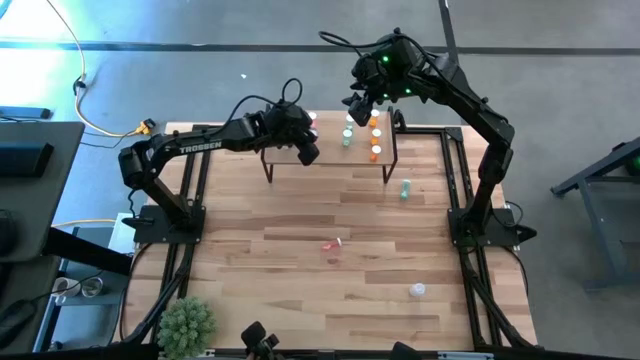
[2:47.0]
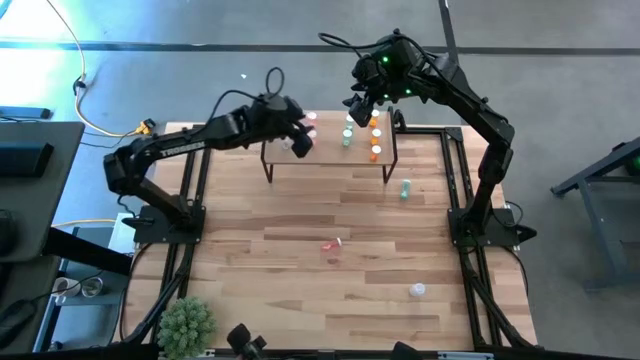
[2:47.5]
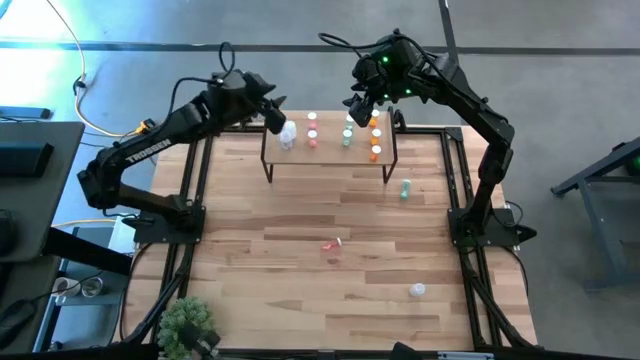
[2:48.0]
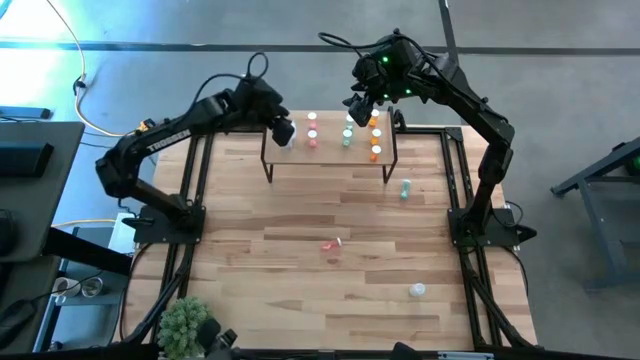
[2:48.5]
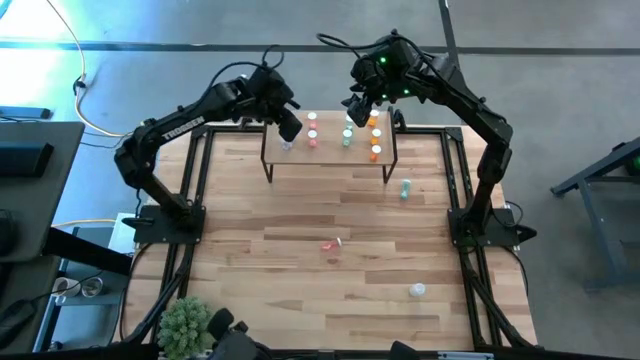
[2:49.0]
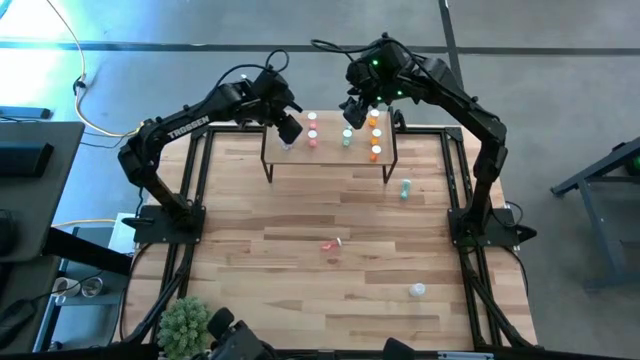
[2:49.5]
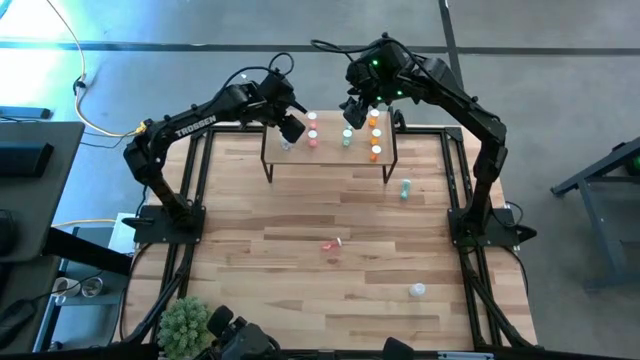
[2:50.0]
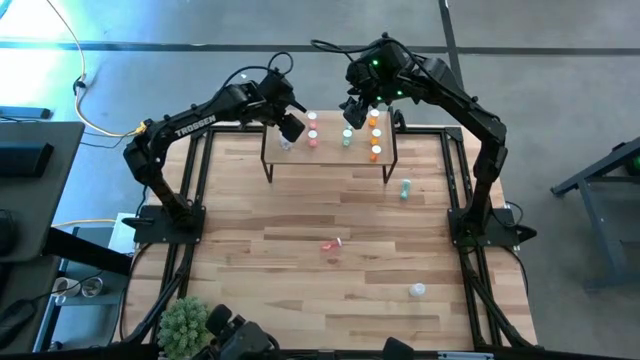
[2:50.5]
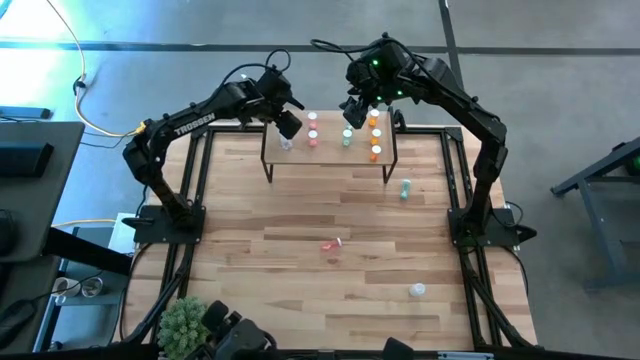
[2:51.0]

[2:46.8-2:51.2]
Task: Pick and place medicine bottles onto shelf by color
Adjust the white pill bottle on the shelf

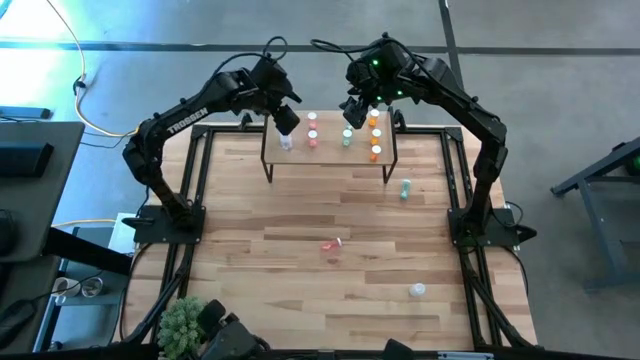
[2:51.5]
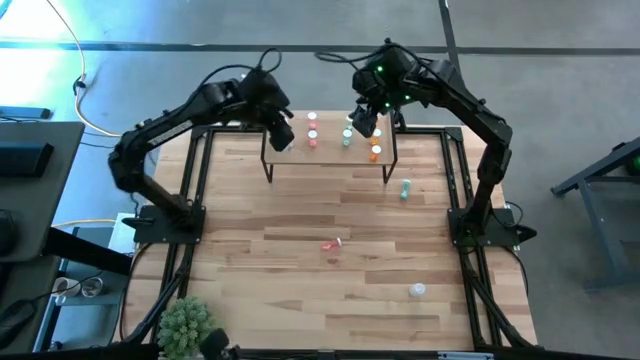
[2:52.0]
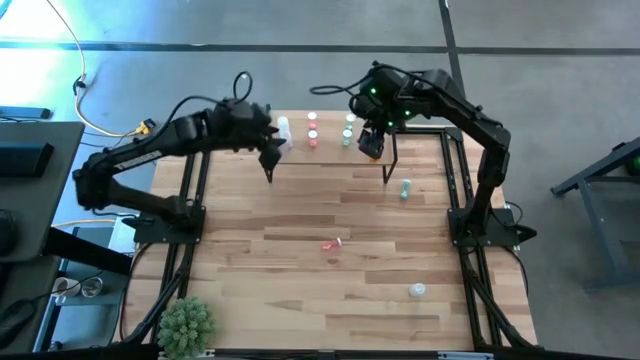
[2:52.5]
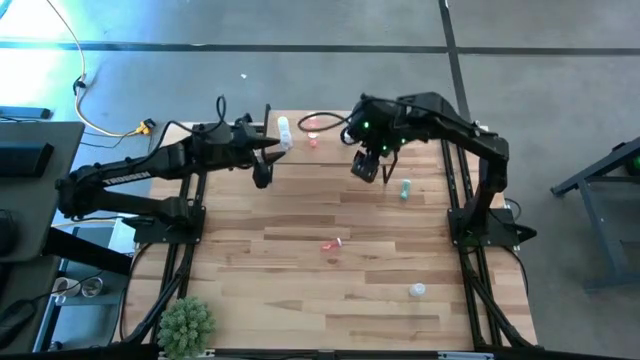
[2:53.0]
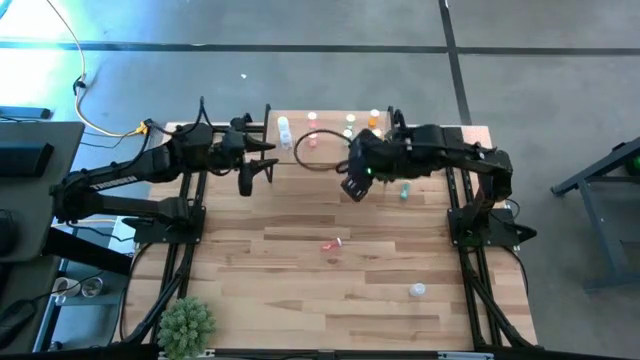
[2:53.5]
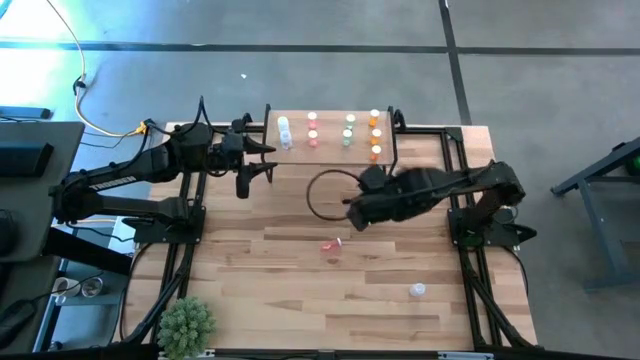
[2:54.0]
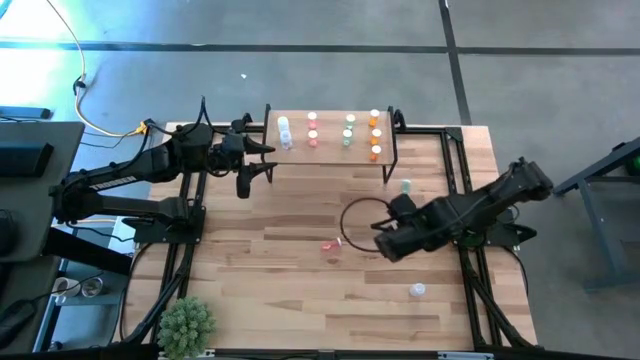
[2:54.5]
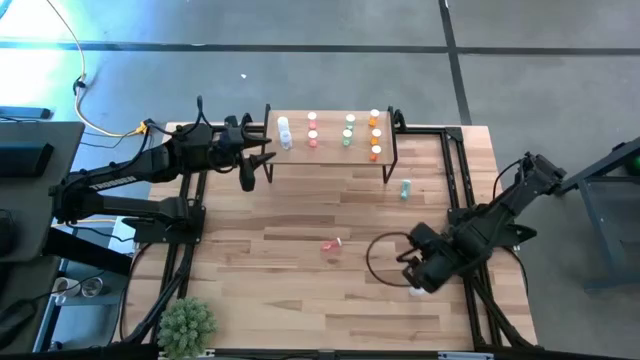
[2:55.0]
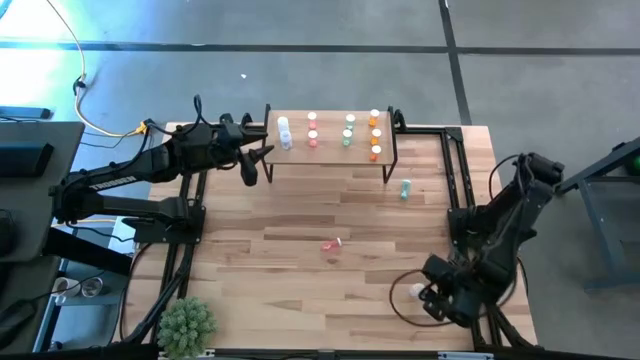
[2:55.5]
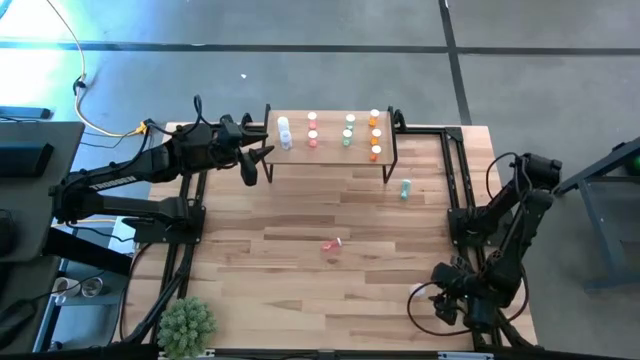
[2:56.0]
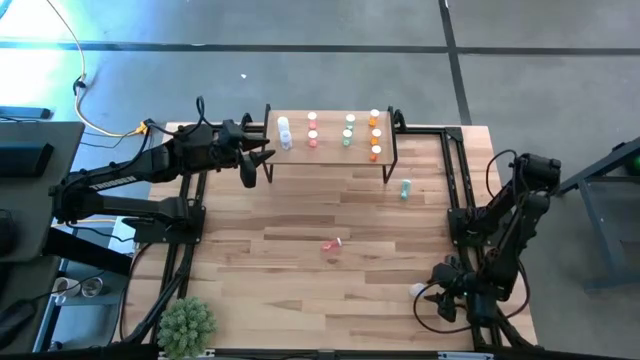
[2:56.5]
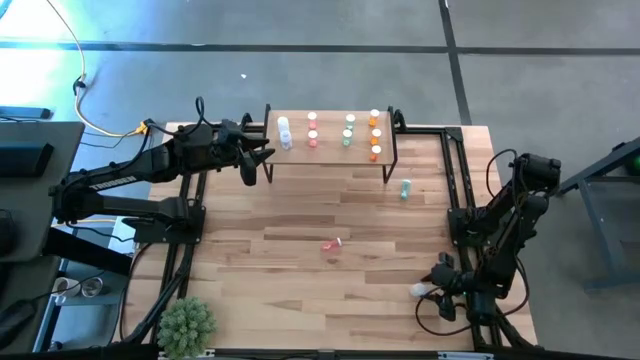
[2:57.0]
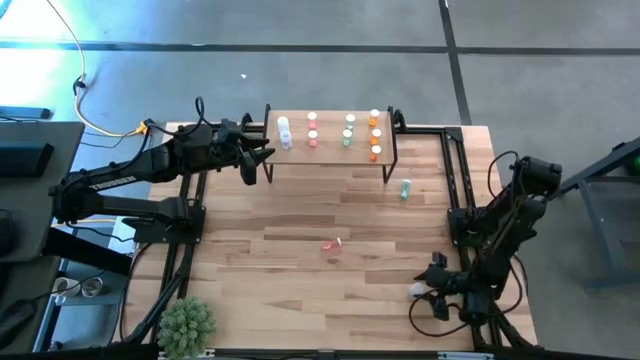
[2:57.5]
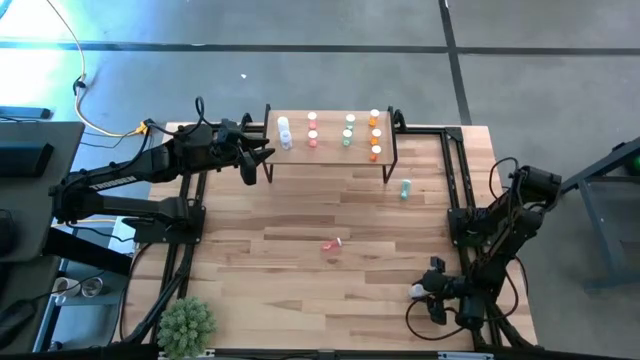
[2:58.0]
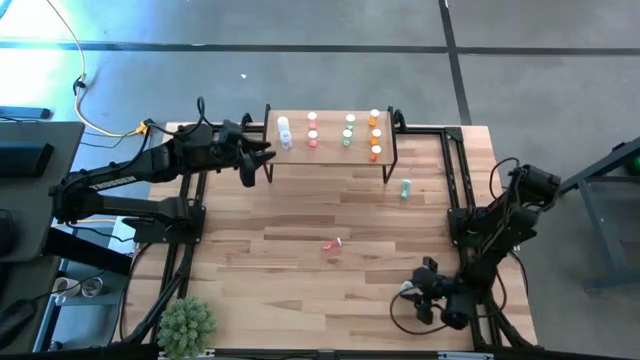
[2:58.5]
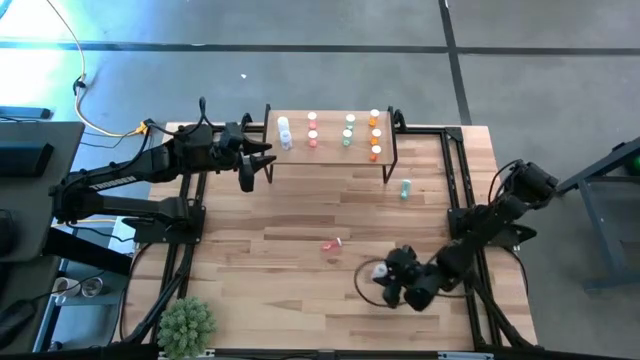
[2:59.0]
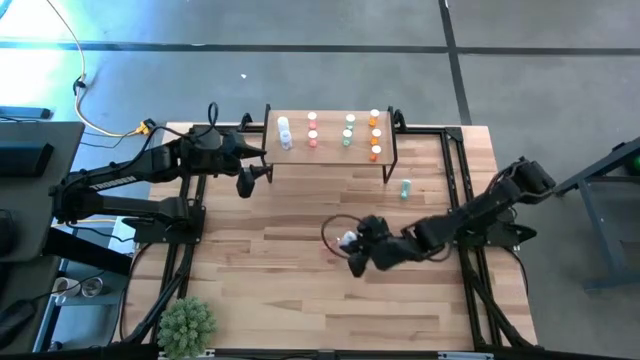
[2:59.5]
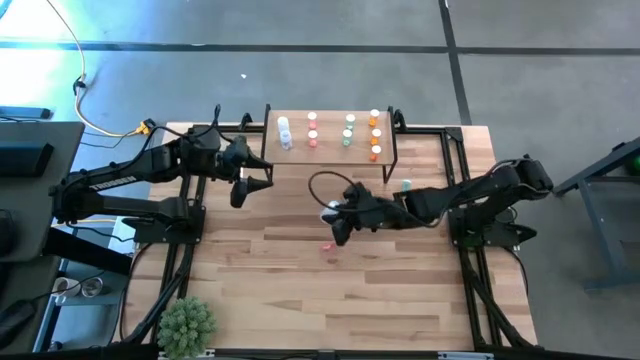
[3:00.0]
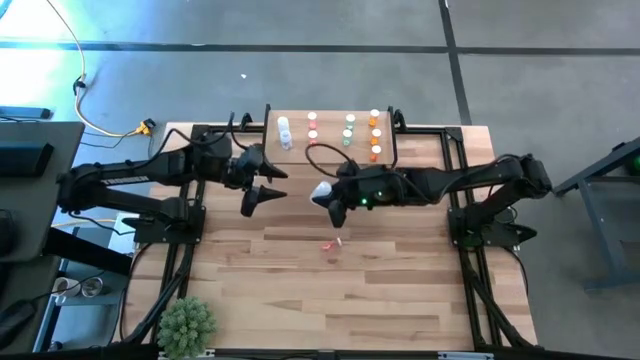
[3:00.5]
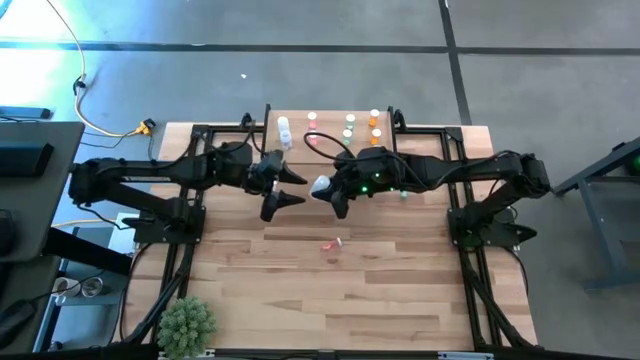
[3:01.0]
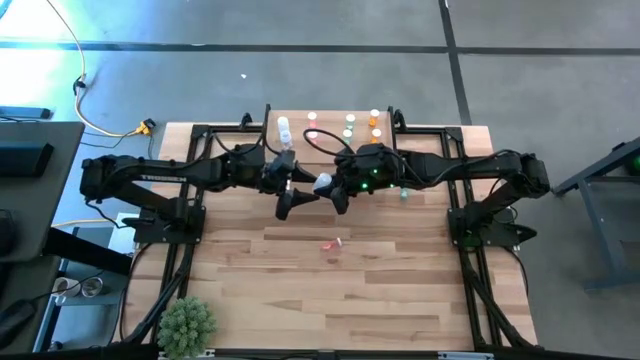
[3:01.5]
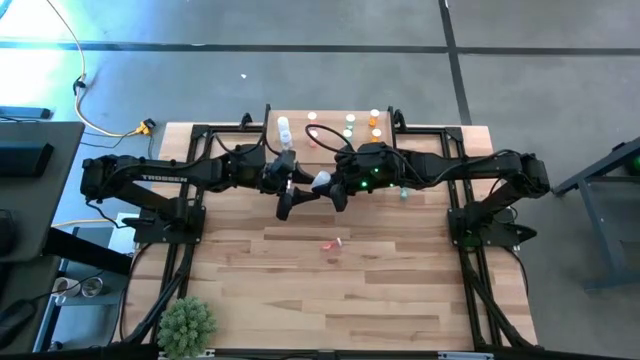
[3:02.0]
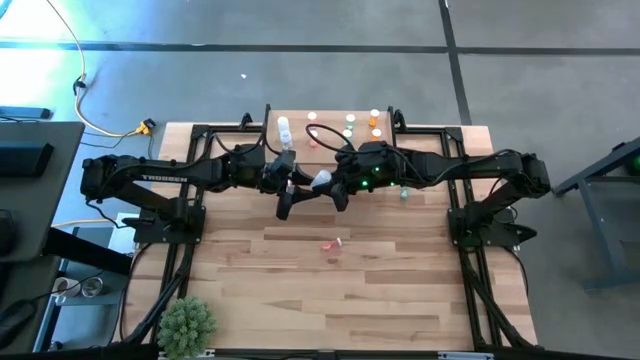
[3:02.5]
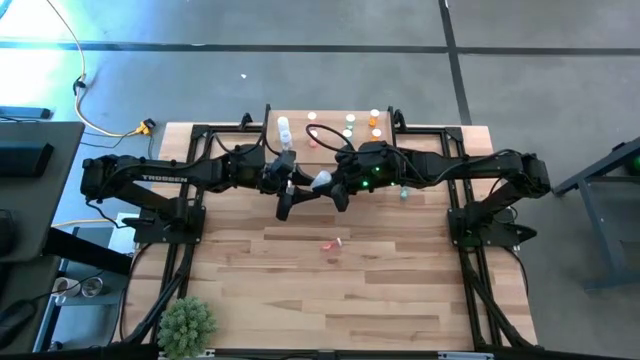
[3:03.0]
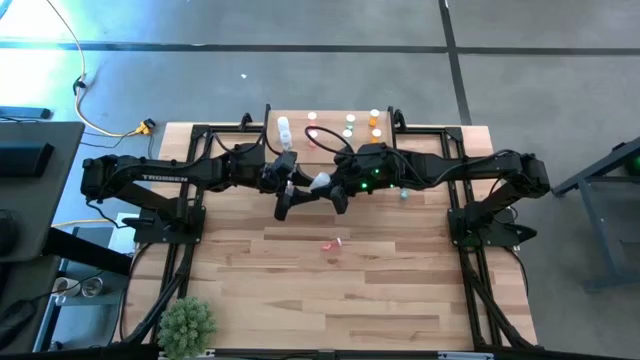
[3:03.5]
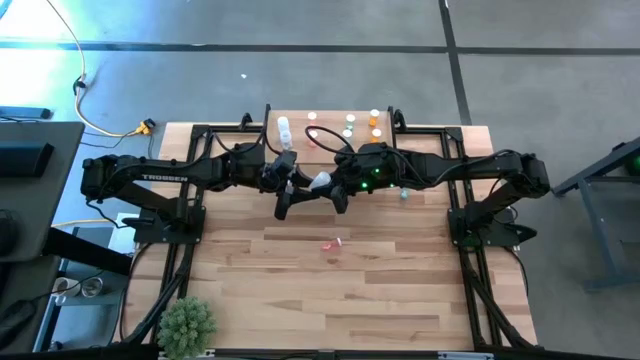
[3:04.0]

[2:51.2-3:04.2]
Put the white pill bottle on the shelf aligned with the other white pill bottles

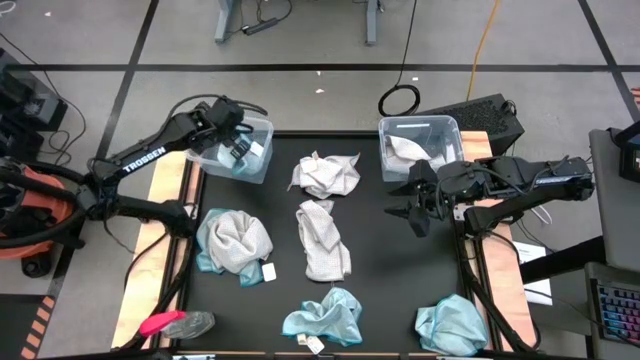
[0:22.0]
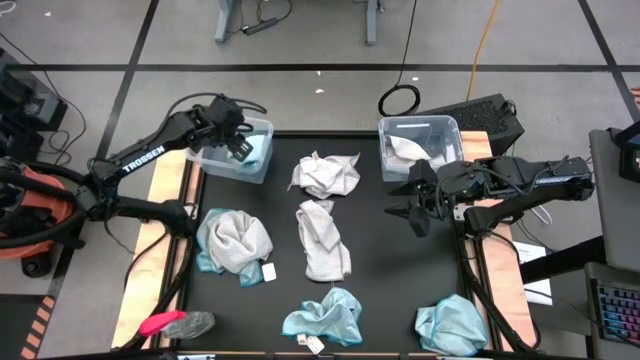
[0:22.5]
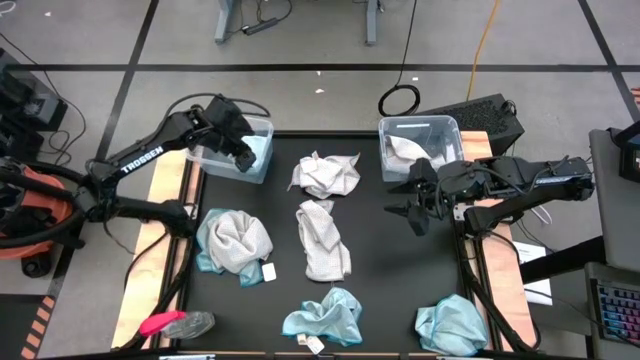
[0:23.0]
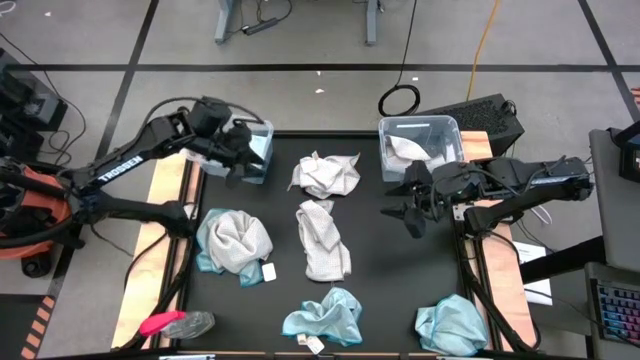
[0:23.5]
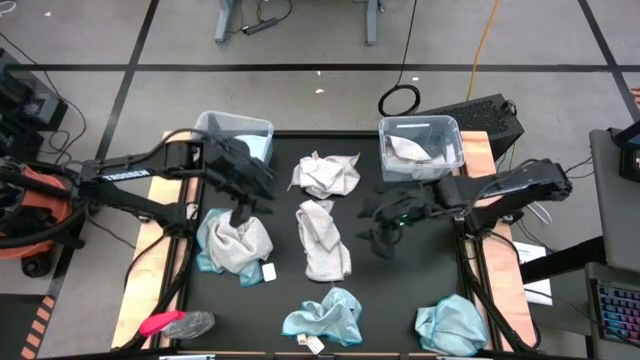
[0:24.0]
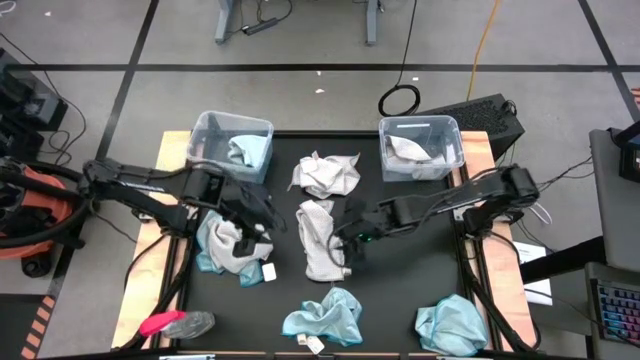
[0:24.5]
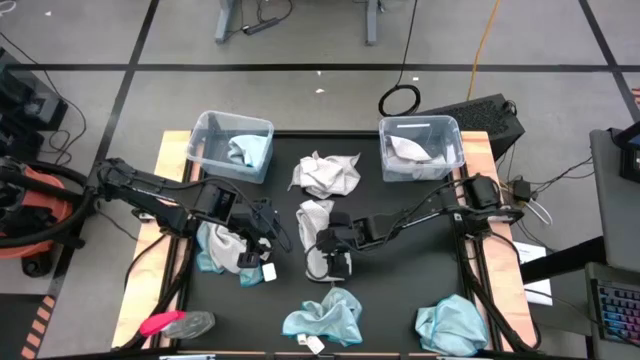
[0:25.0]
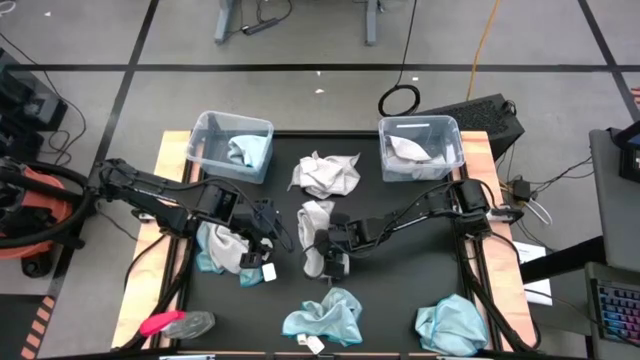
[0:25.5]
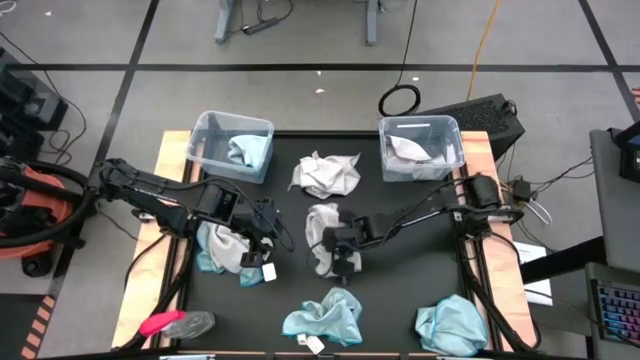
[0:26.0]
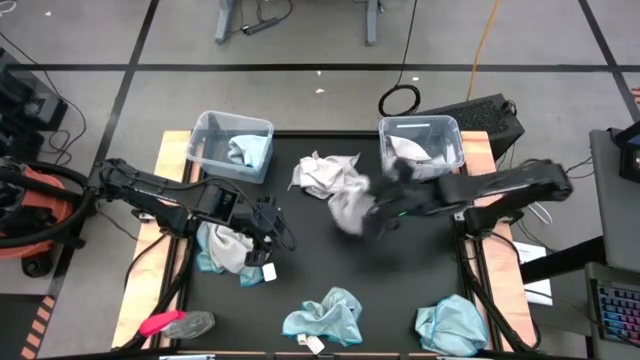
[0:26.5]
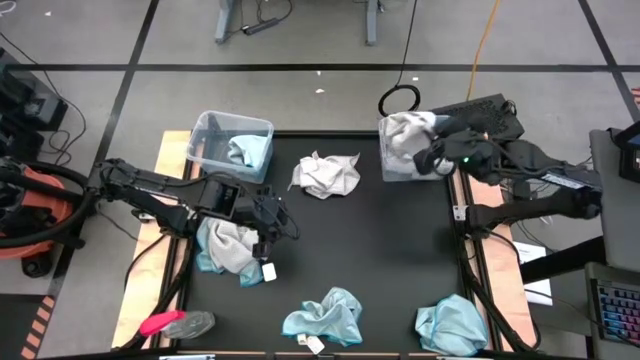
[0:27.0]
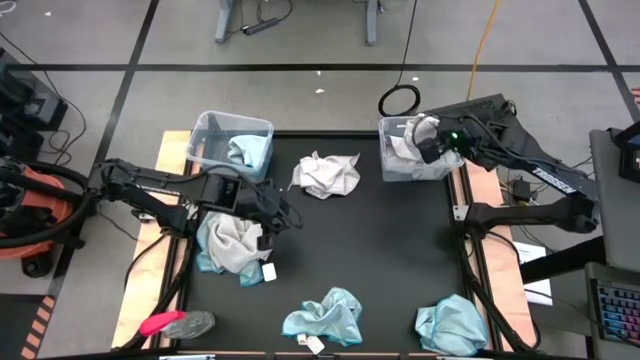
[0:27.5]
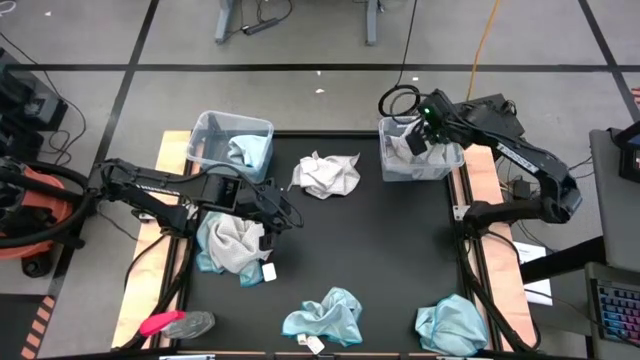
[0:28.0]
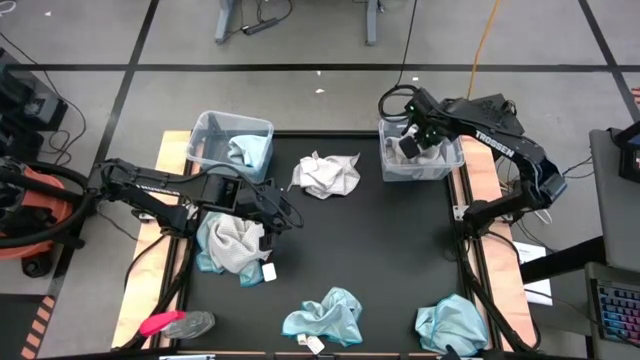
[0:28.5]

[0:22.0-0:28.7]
Task: Sort microfiber towel by color & place in baskets
Put the gray microfiber towel into the right transparent bin
